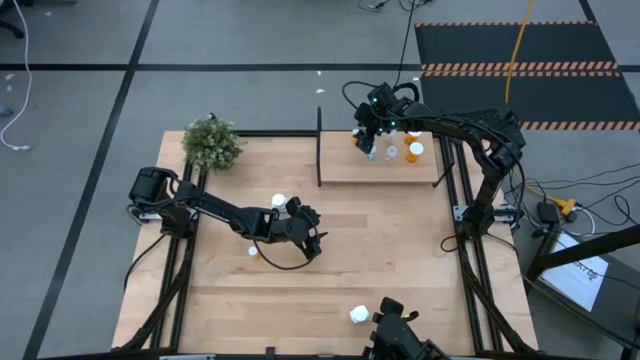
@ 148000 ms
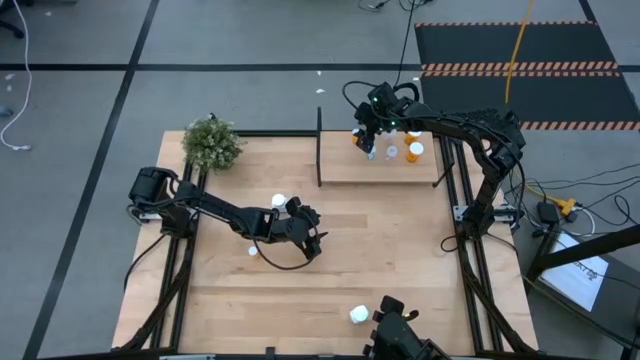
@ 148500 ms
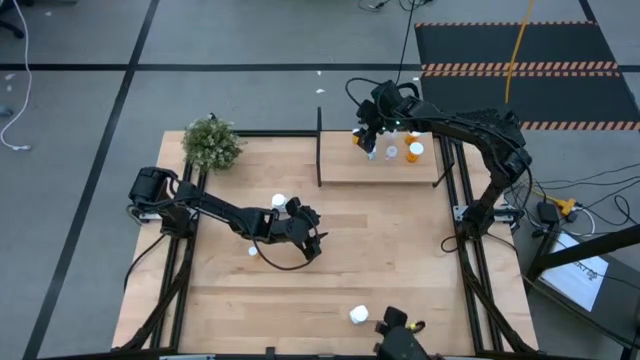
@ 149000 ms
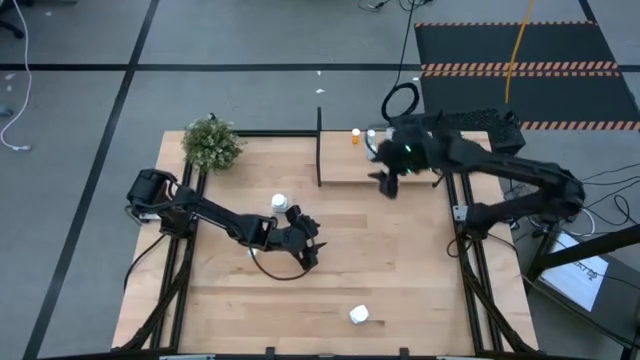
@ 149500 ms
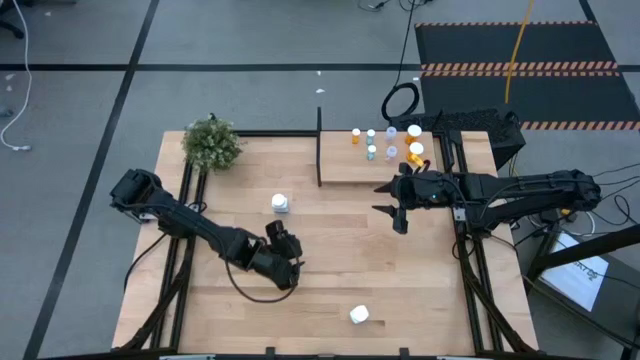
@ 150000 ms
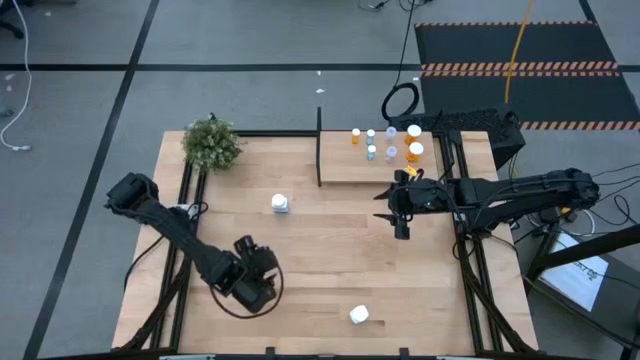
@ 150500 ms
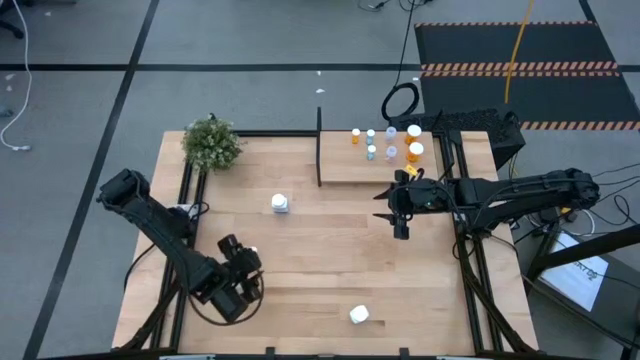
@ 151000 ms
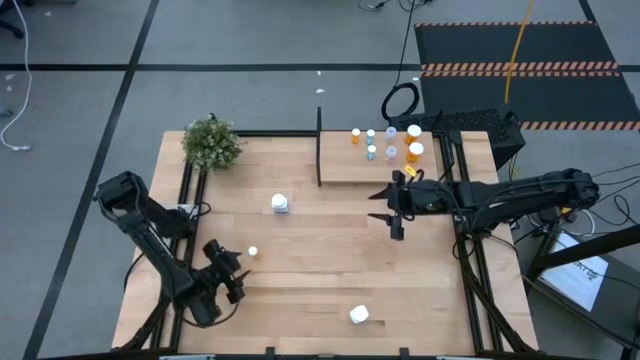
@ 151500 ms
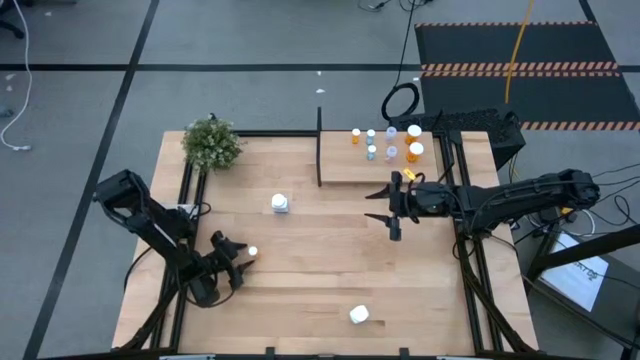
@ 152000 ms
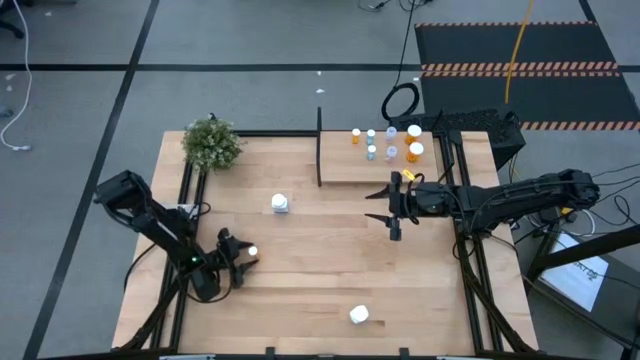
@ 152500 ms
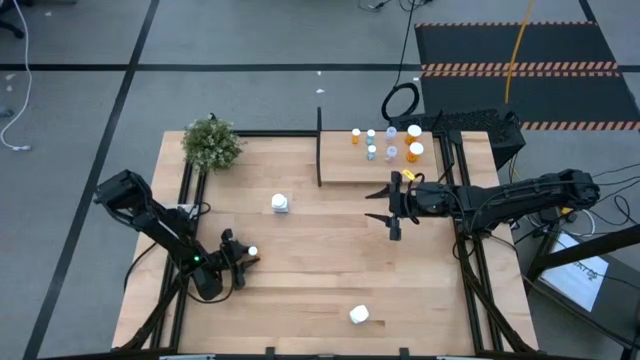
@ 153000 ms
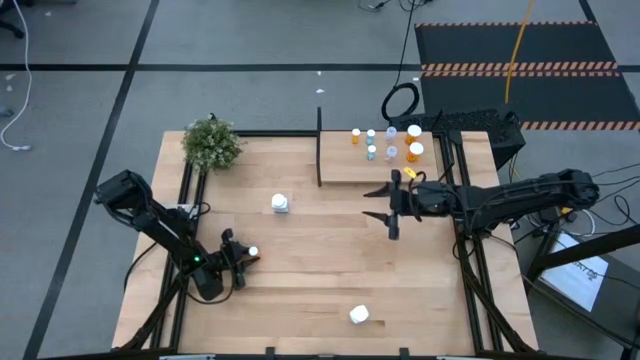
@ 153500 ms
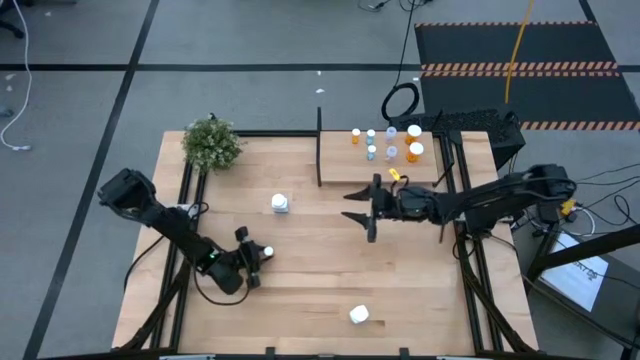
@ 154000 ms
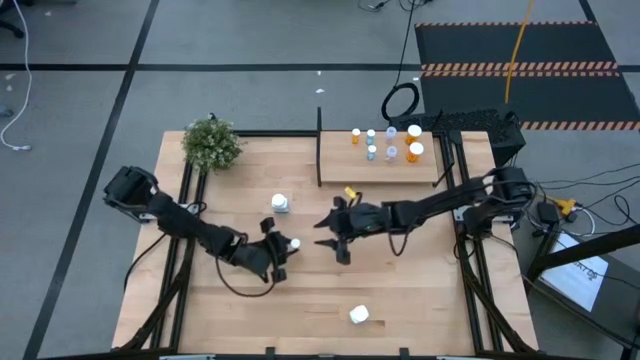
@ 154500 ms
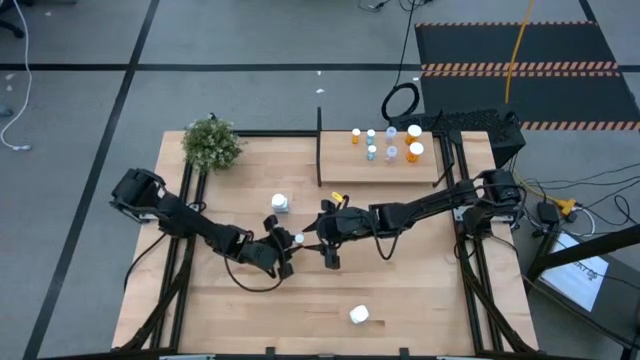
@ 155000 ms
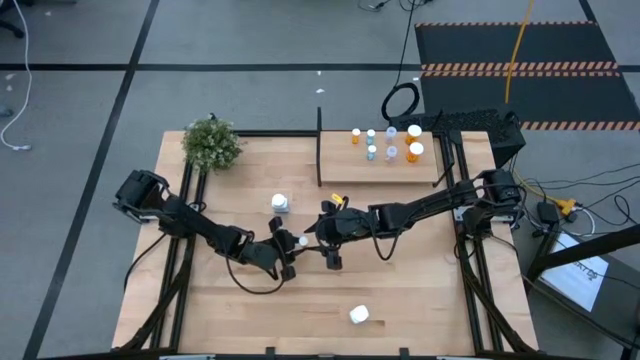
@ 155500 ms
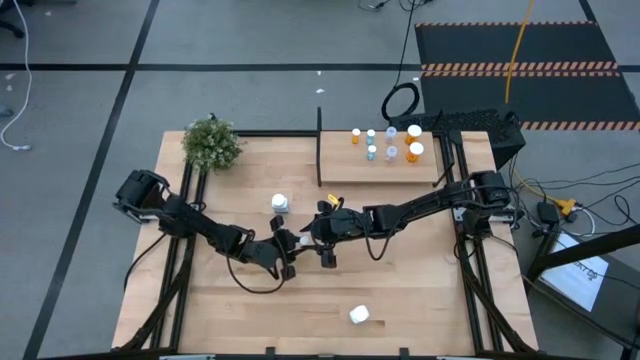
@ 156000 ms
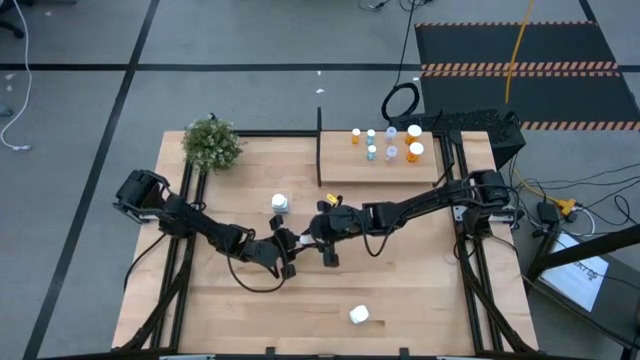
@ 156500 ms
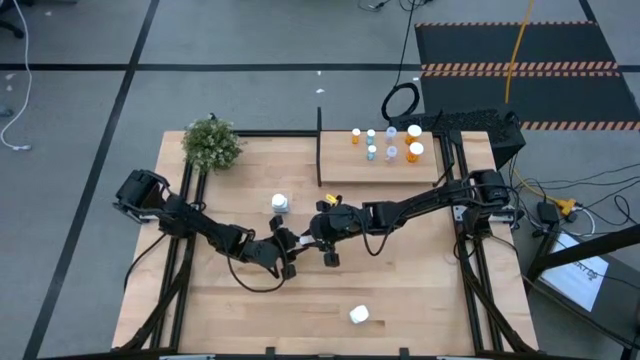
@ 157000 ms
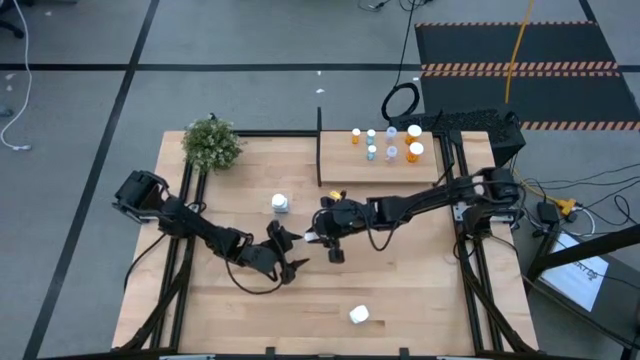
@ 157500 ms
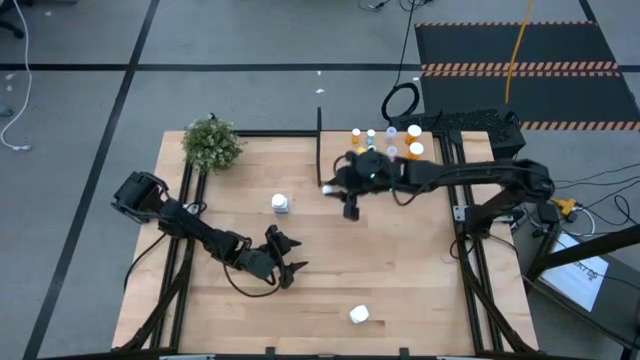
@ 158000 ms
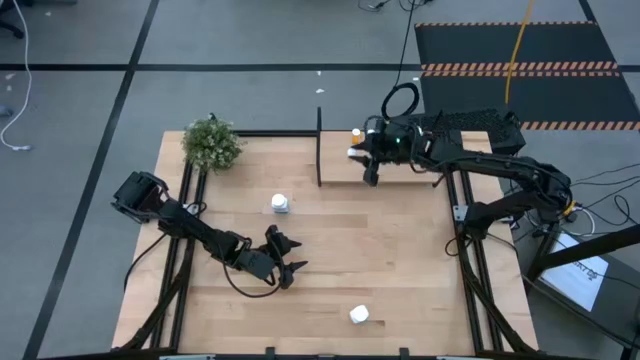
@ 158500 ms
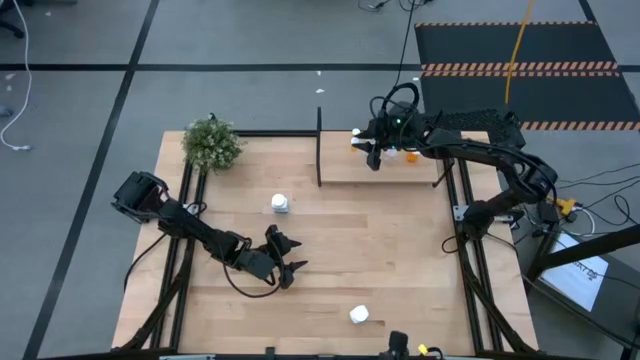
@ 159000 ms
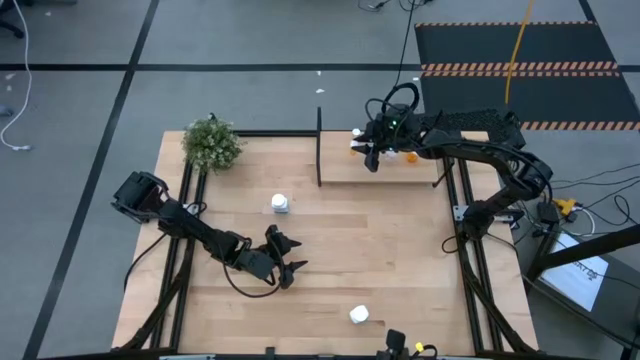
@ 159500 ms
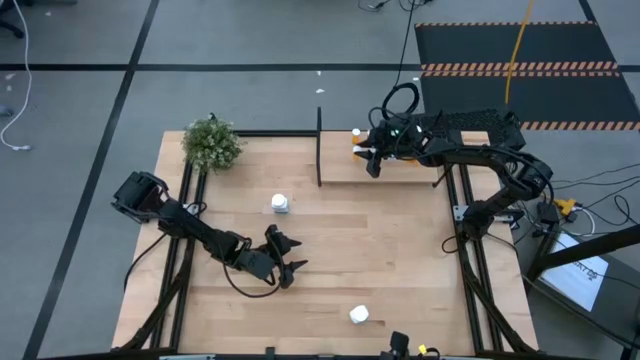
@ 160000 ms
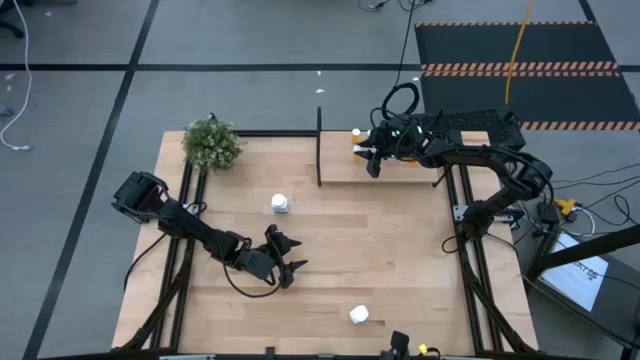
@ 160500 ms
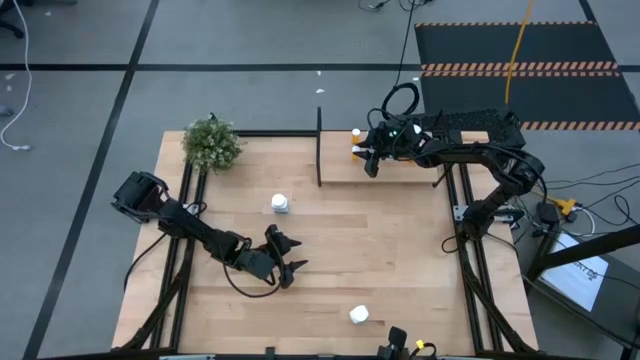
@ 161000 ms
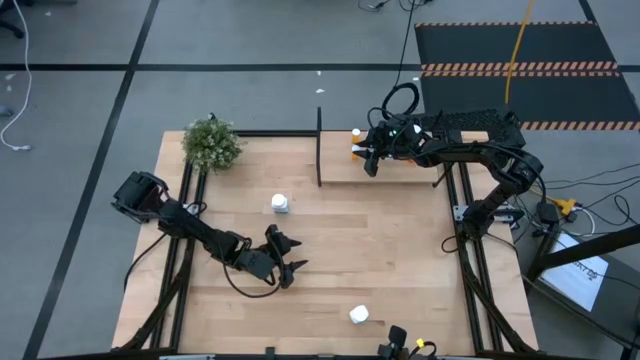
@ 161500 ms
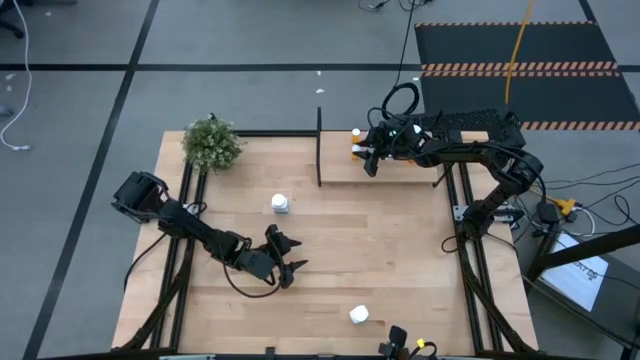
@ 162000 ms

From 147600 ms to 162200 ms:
Task: Pick and place medicine bottles onto shelf by color
Put the small orange pill bottle on the shelf aligned with the other small orange pill bottle

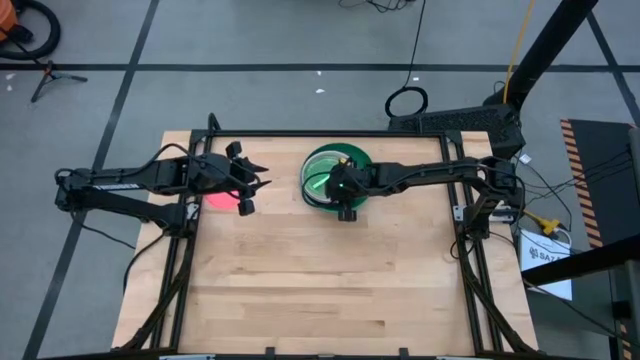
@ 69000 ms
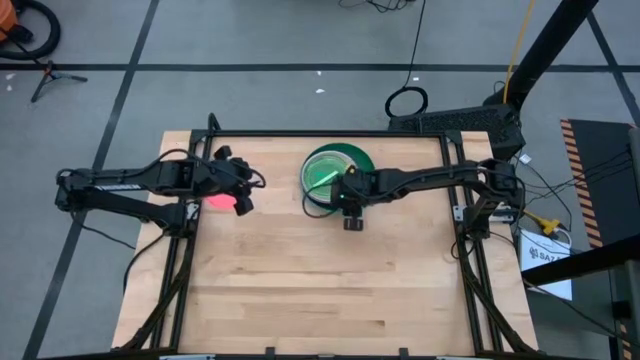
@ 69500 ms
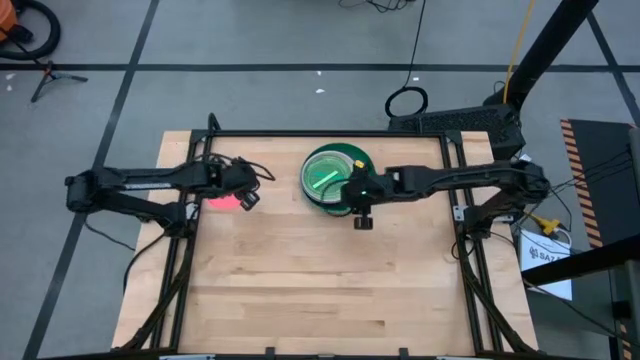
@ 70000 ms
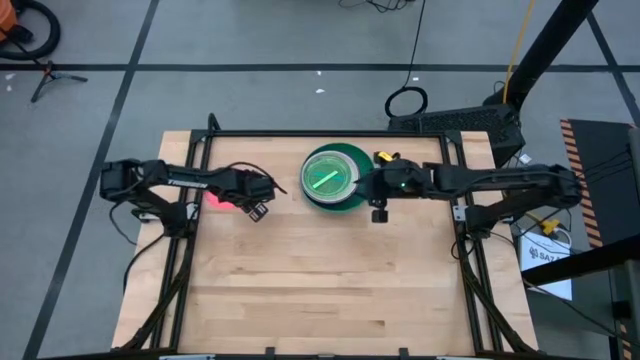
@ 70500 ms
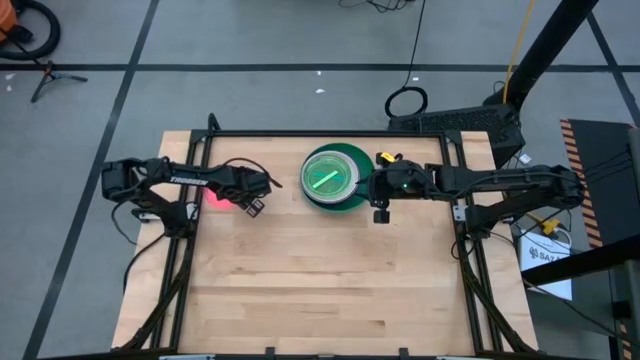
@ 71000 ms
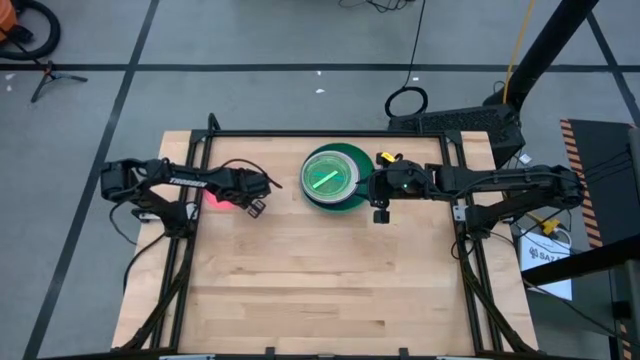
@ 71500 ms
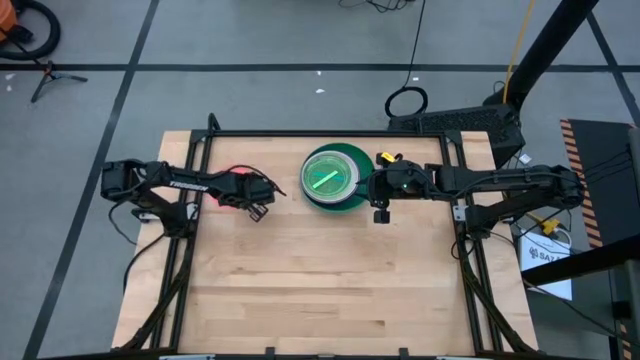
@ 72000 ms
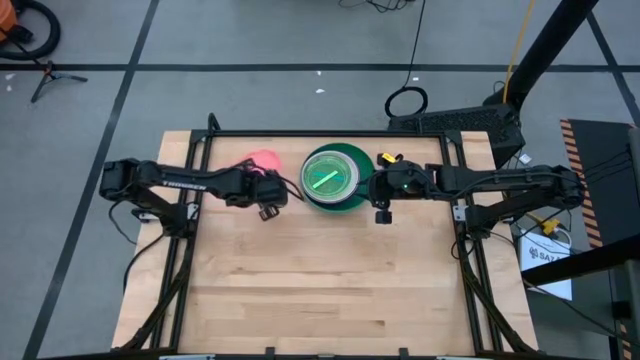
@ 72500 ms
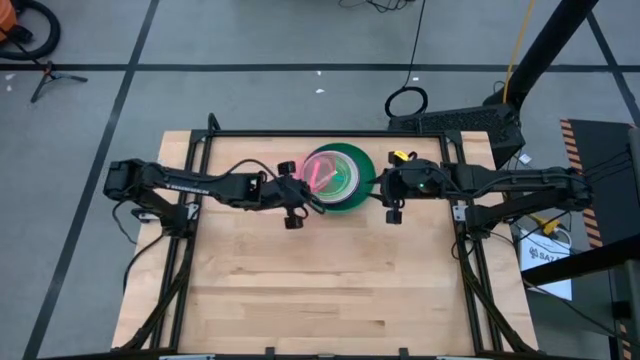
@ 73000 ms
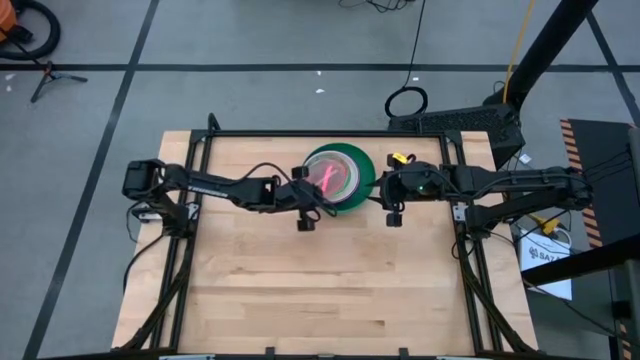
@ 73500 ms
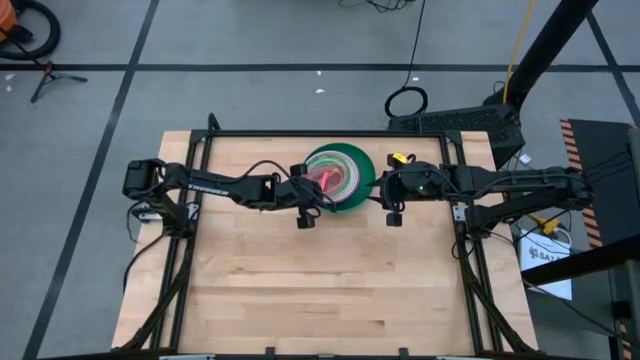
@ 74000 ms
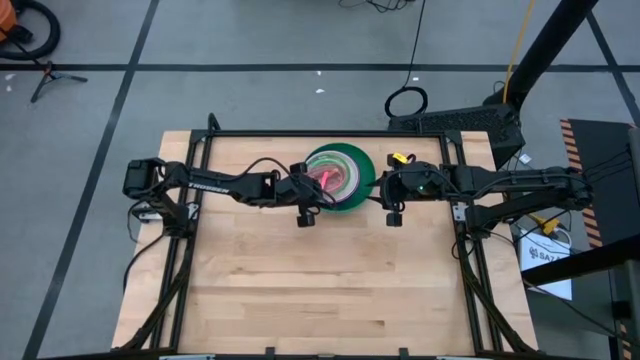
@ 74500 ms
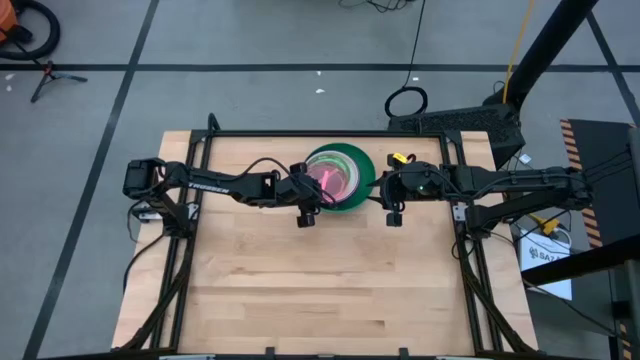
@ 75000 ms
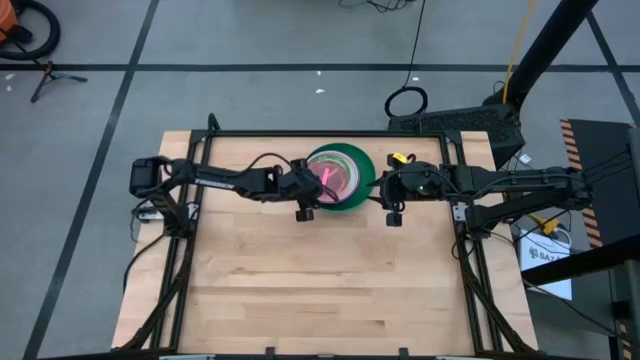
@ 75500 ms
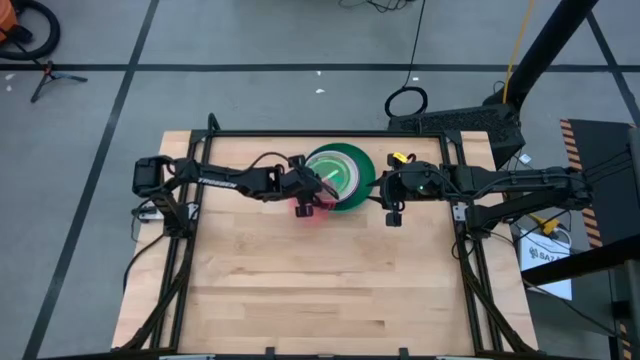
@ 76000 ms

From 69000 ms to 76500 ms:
Task: Stack plastic plates
Stack the pink plate on top of the green plate
